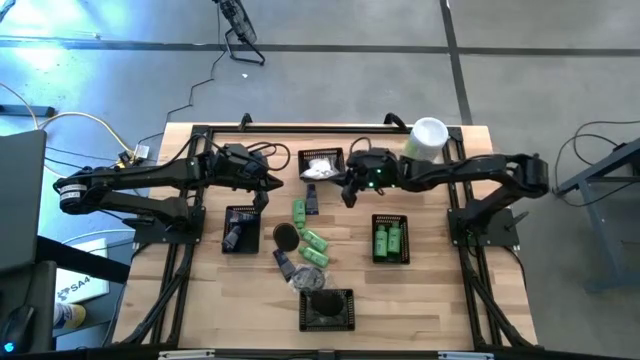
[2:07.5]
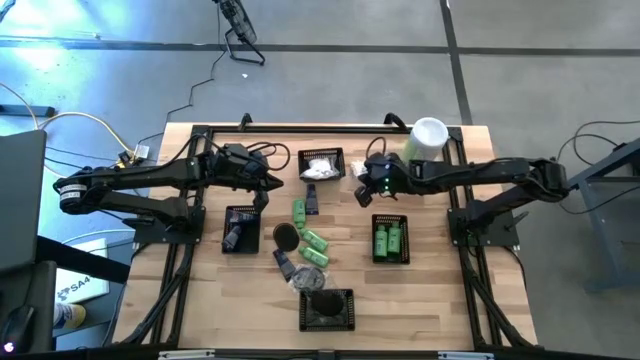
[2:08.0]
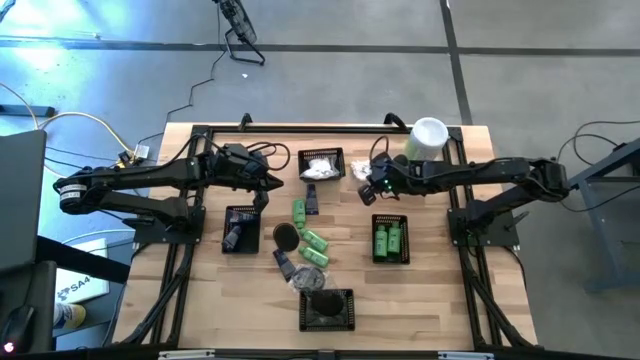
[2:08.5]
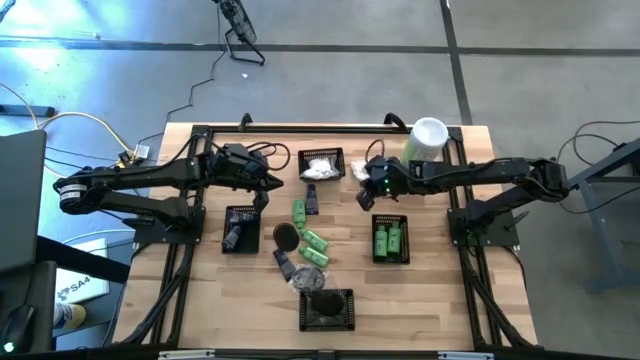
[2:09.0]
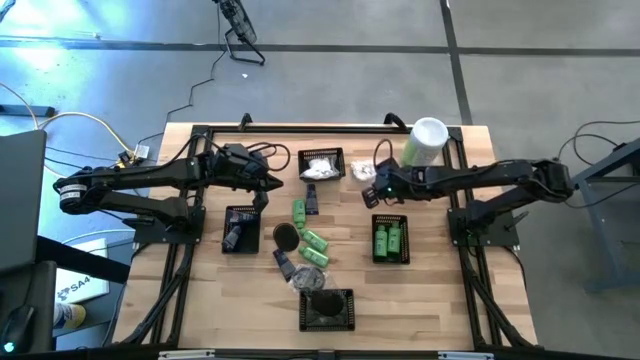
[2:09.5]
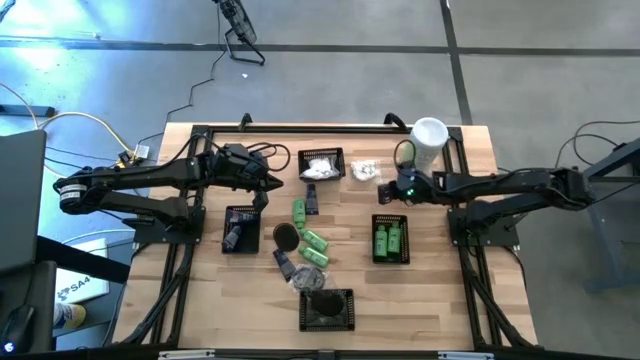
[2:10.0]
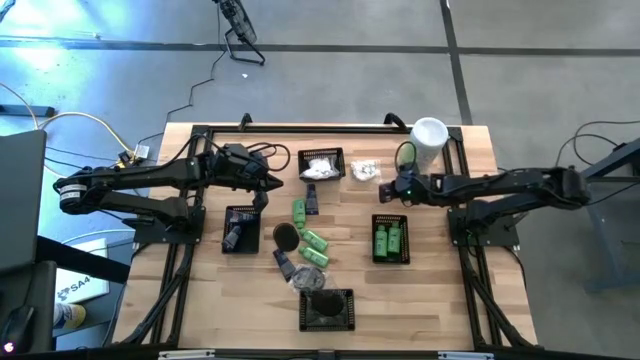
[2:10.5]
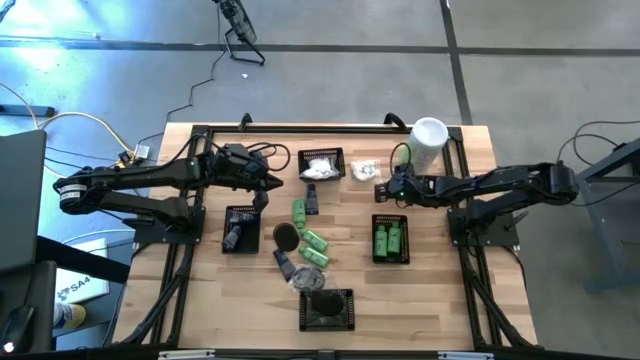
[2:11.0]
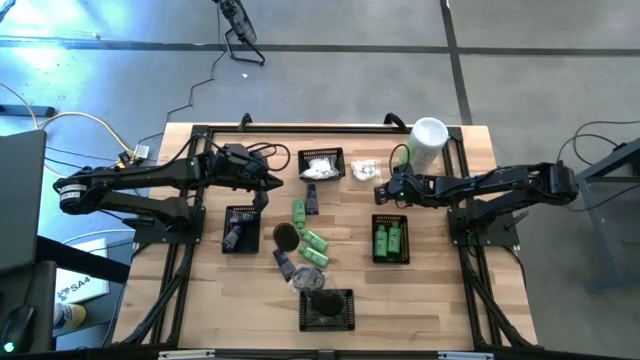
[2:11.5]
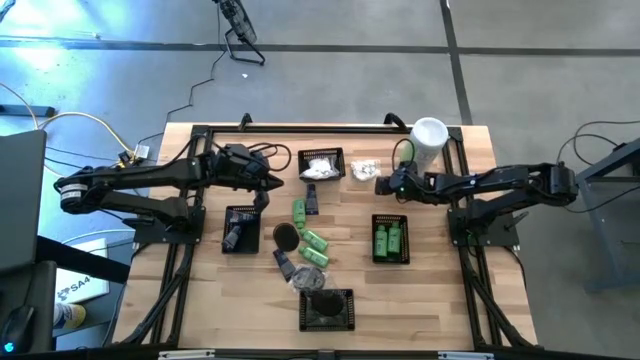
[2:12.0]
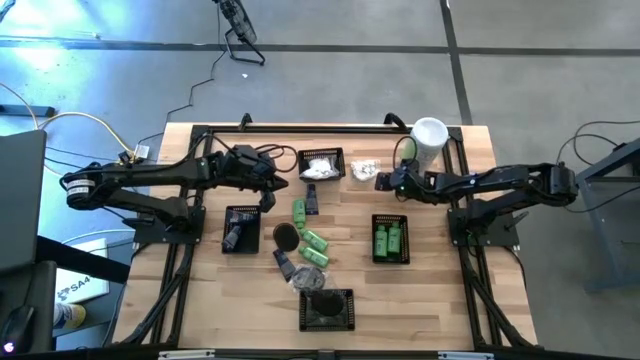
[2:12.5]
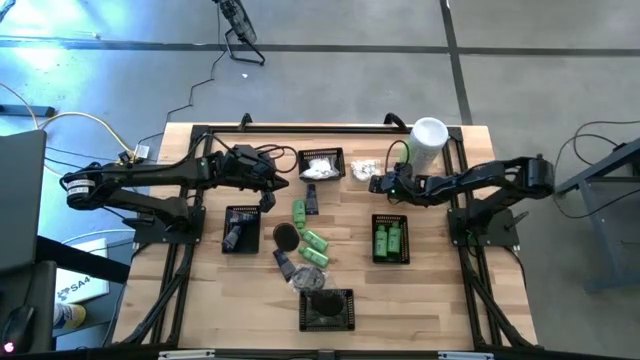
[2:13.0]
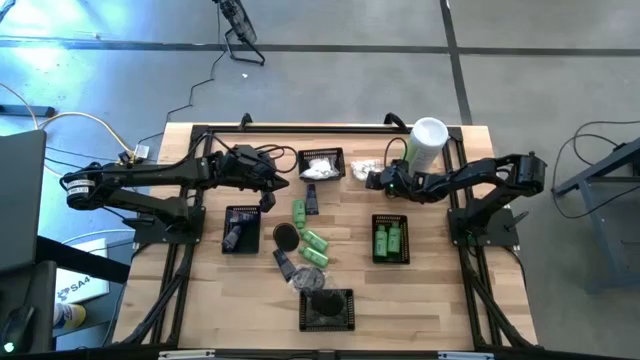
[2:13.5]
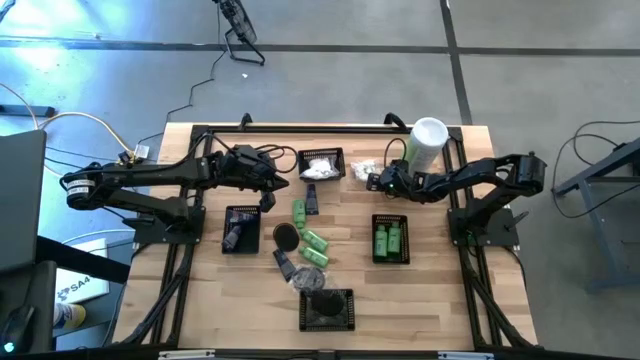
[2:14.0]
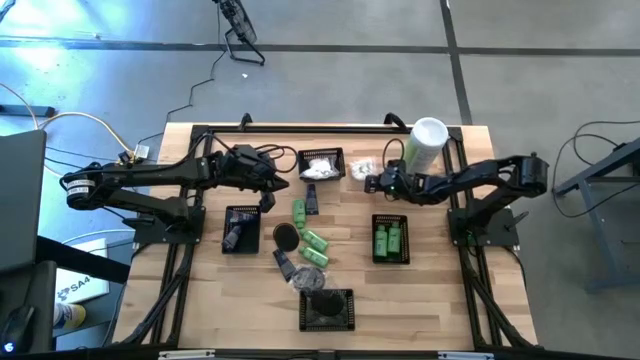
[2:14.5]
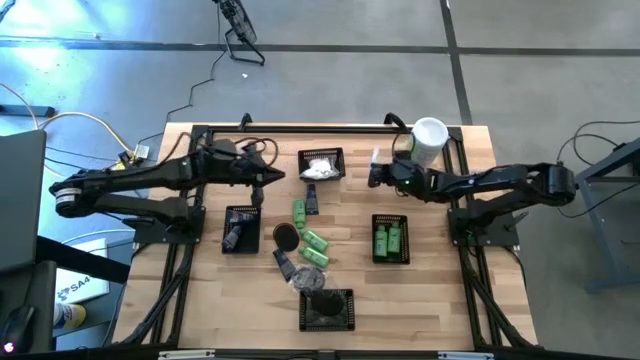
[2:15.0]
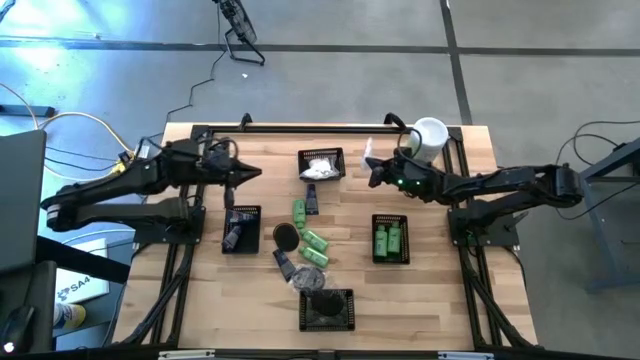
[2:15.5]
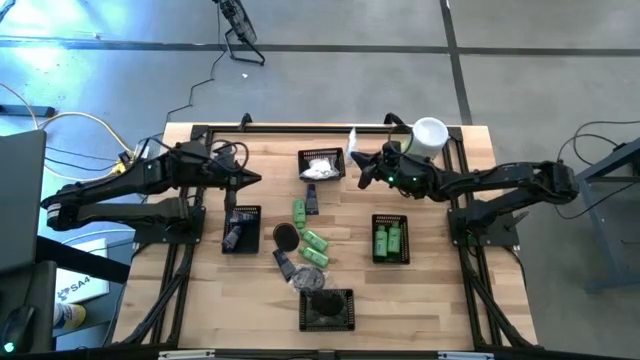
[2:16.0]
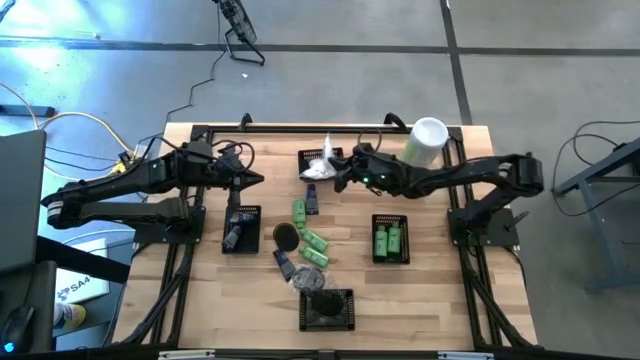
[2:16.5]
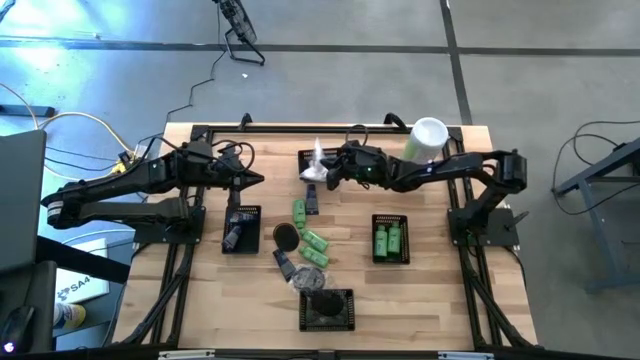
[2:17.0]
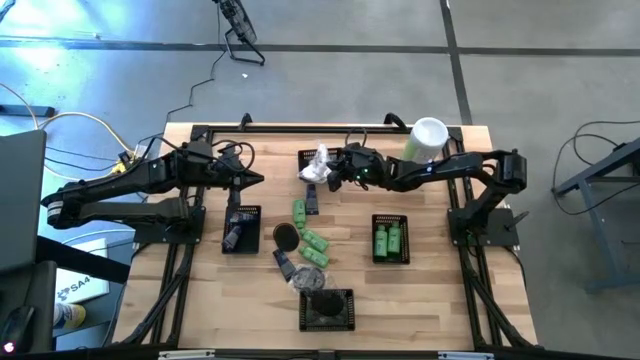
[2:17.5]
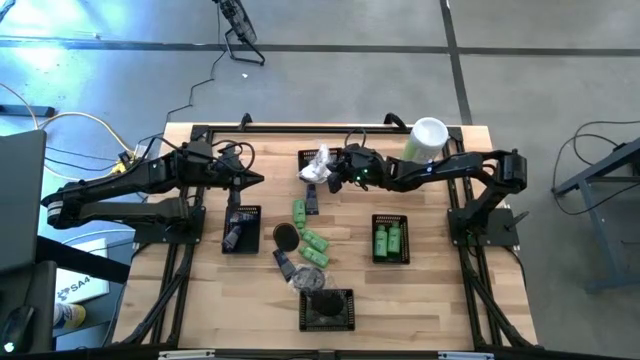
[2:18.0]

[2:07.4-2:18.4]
Task: Pick & Place Travel size toiletries
Put the pack of cotton buds into the top middle black bin
